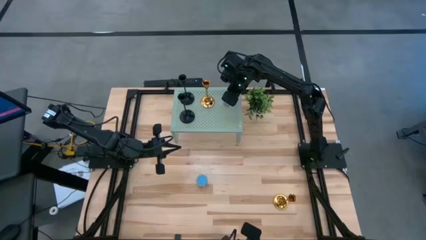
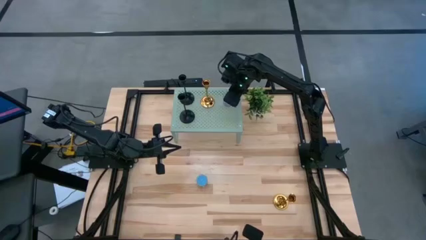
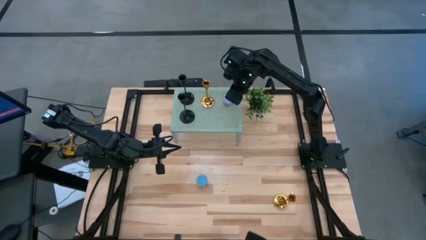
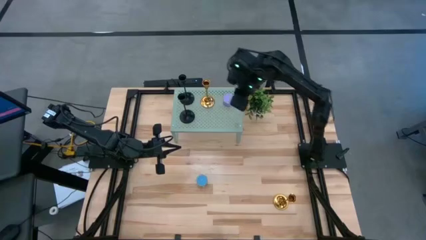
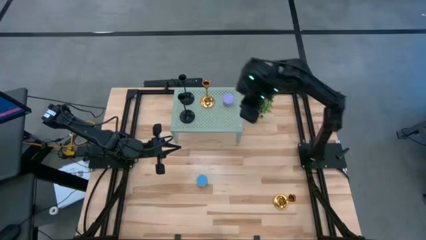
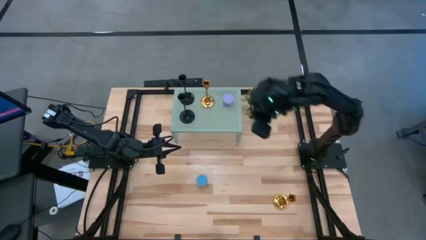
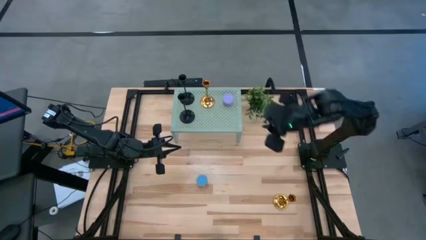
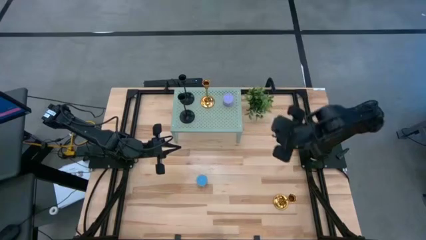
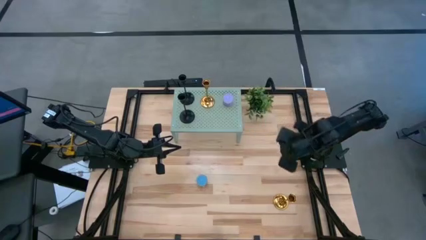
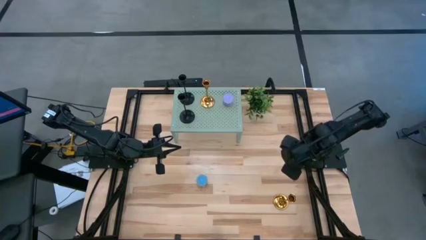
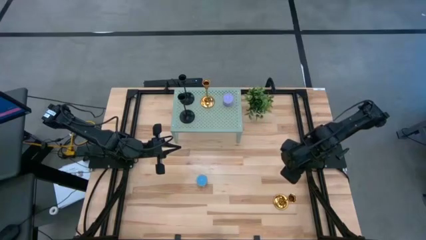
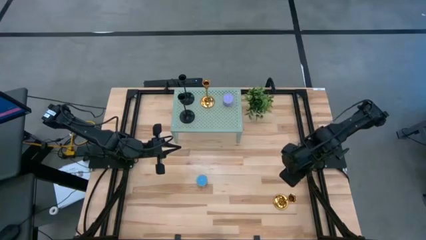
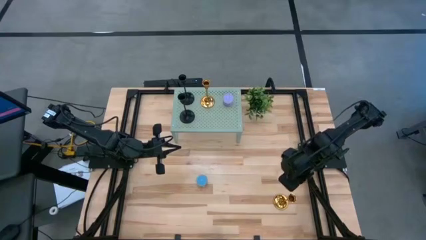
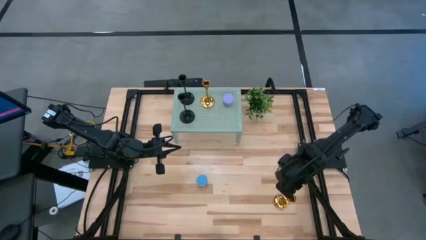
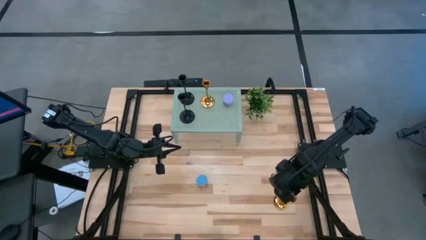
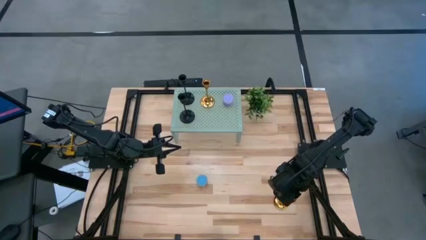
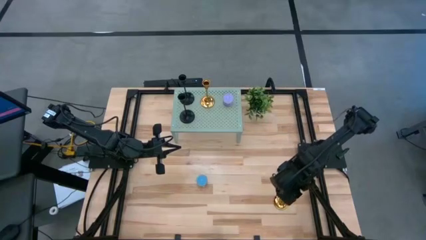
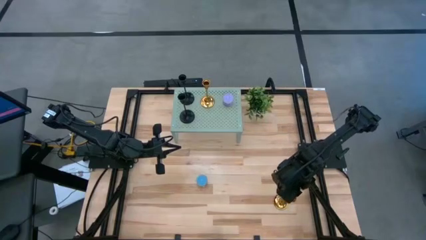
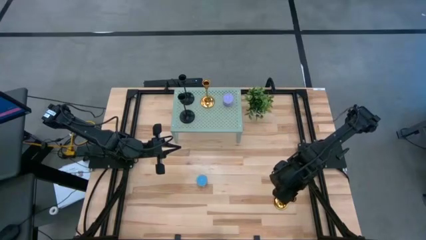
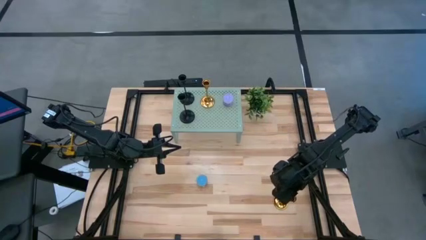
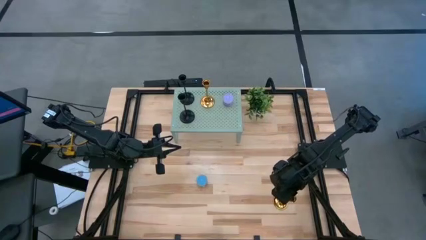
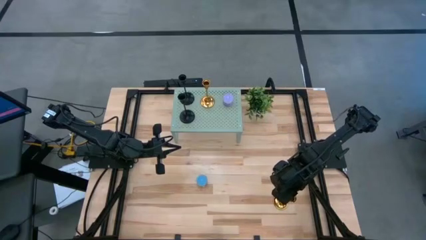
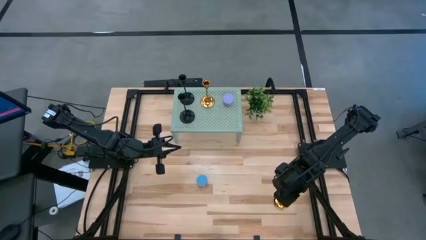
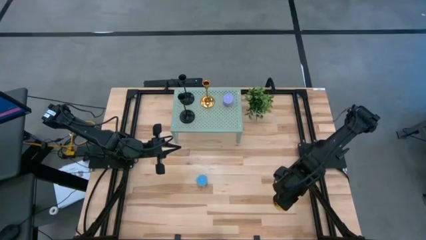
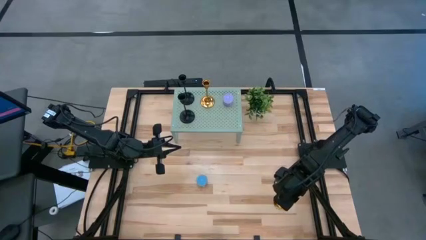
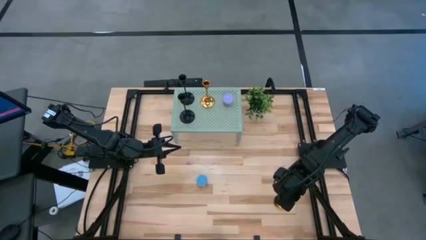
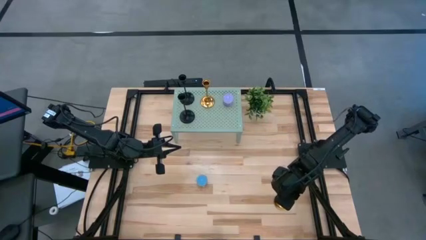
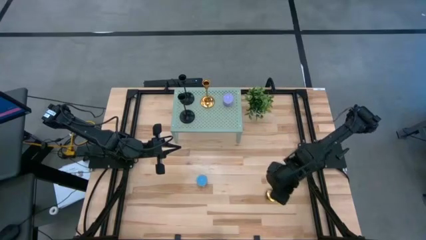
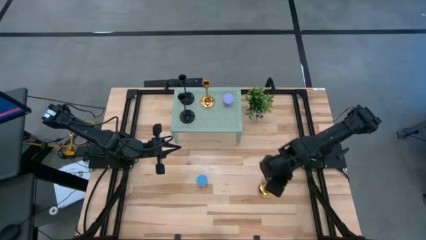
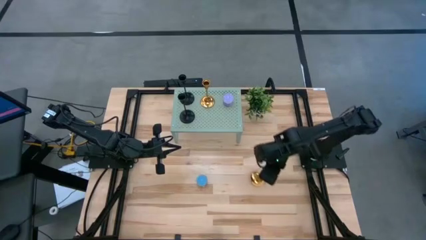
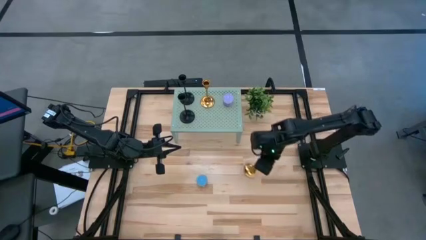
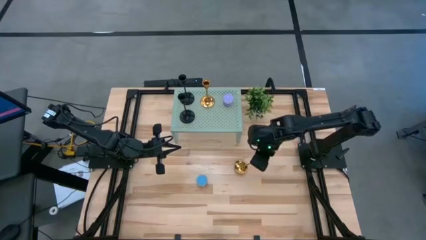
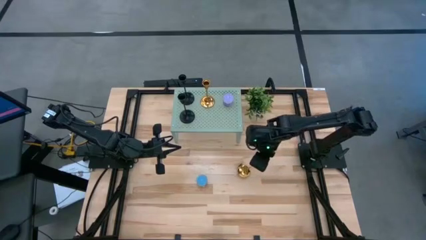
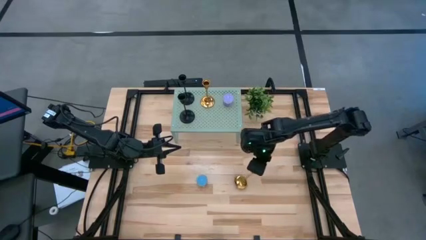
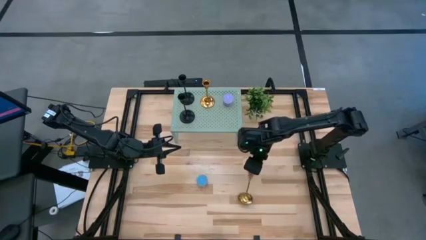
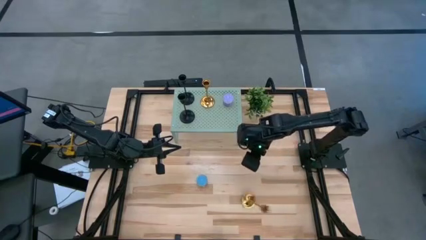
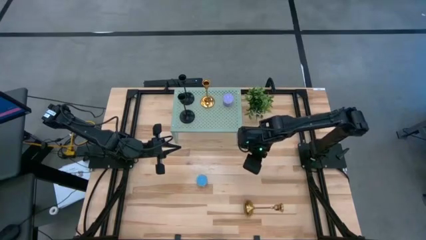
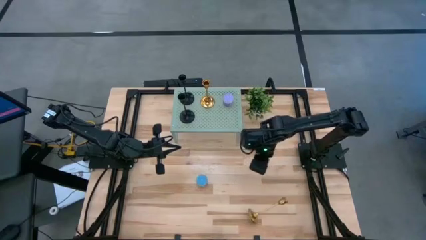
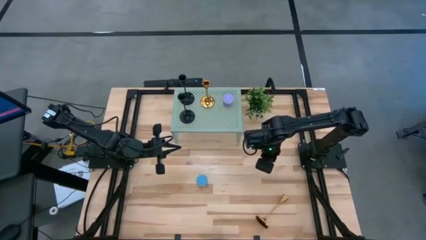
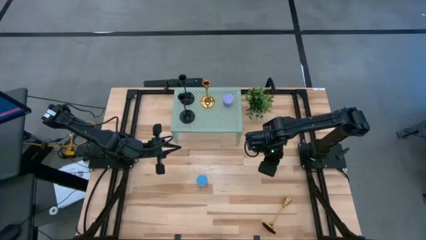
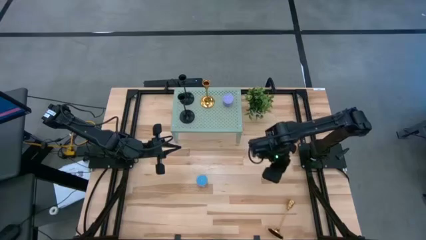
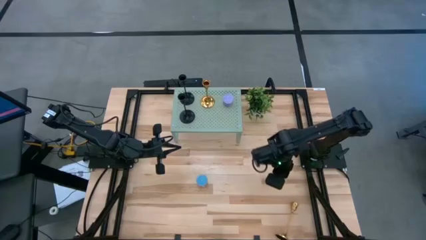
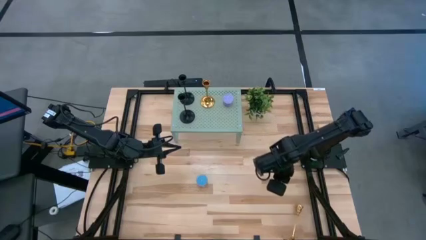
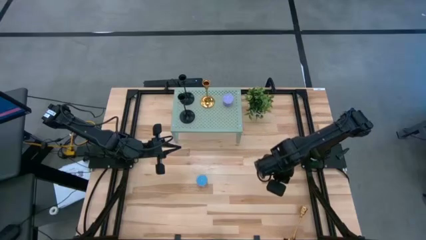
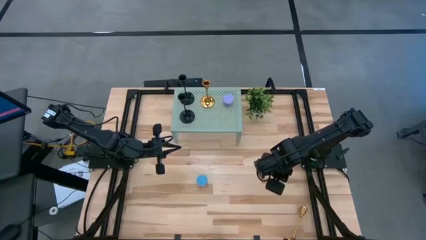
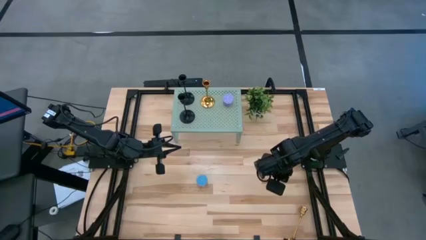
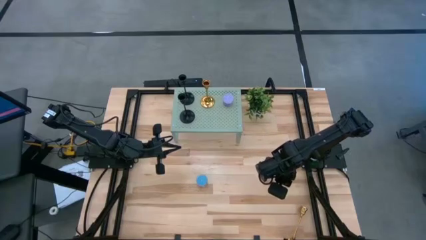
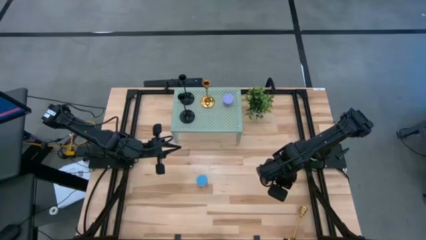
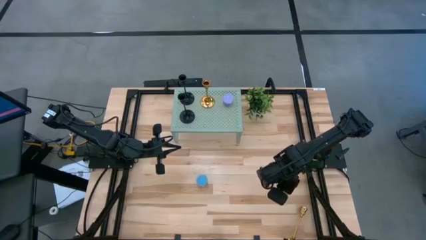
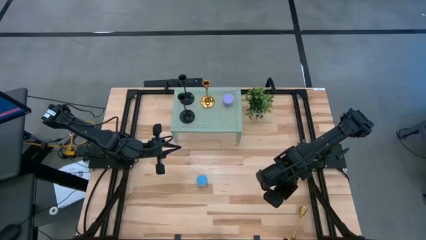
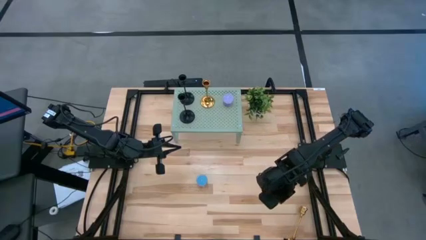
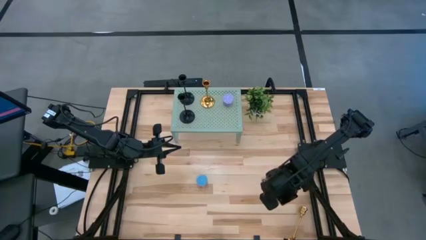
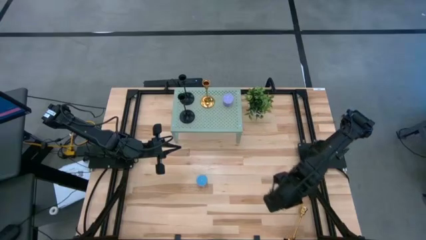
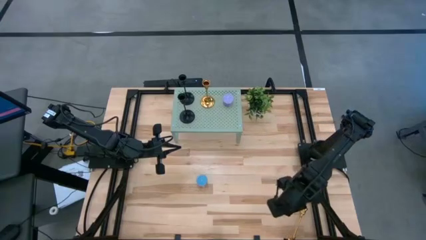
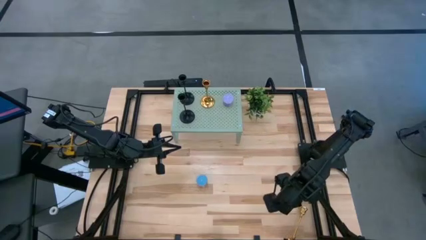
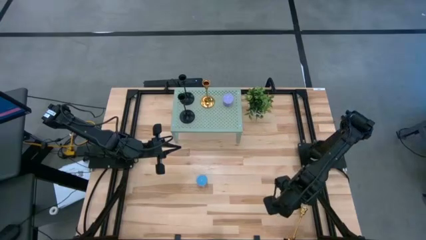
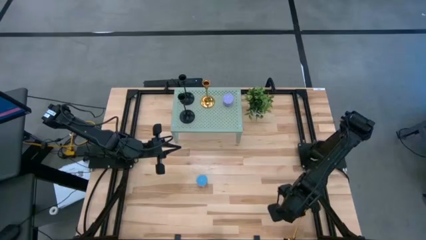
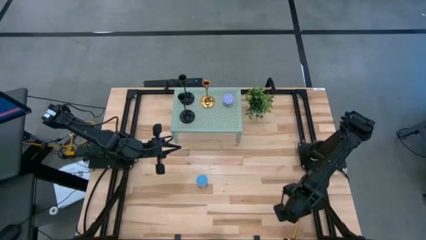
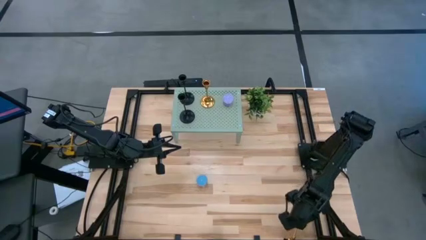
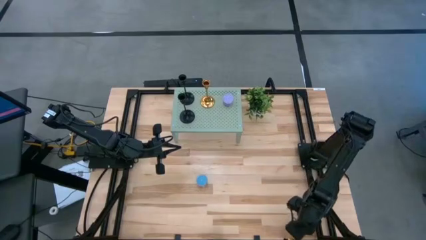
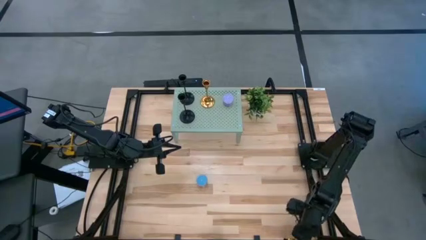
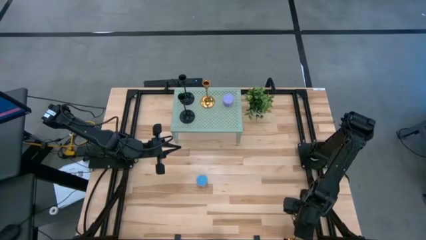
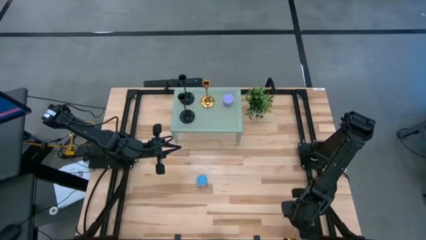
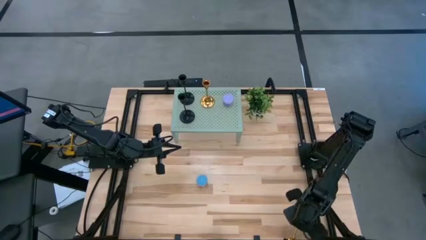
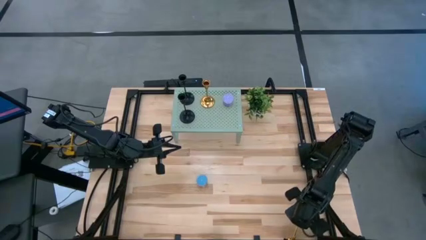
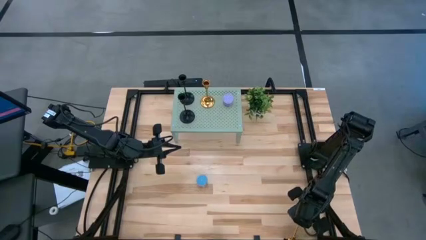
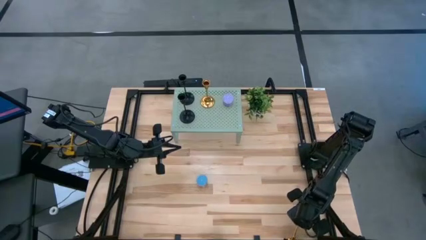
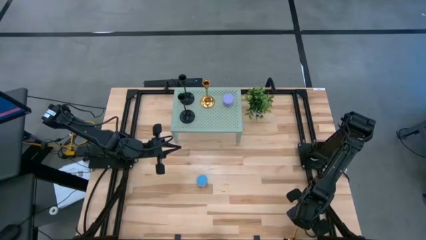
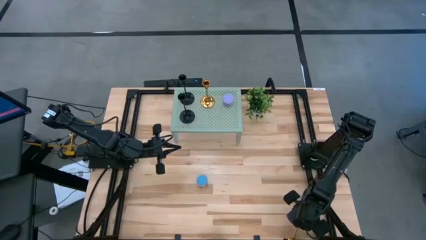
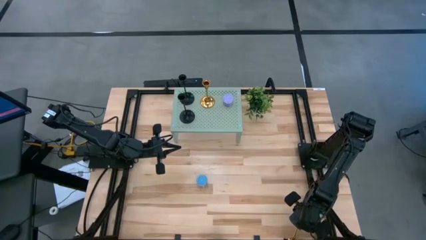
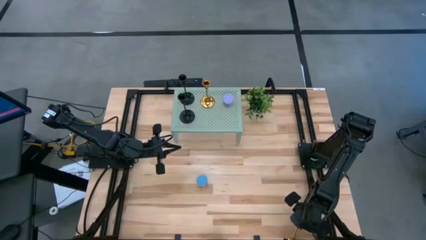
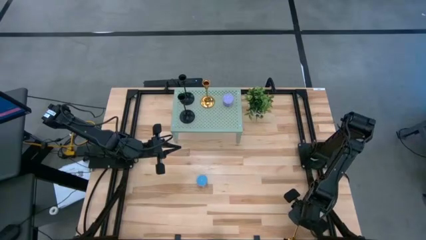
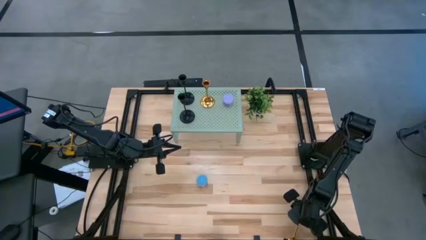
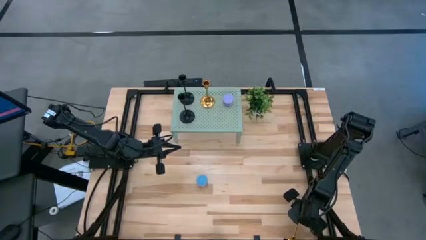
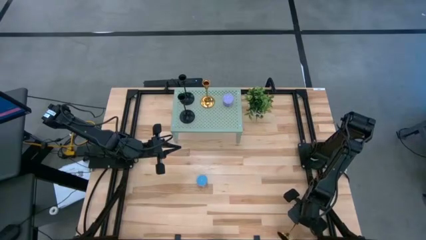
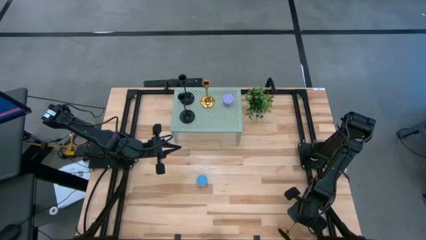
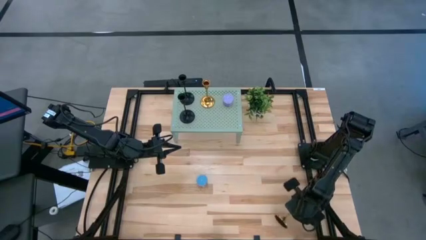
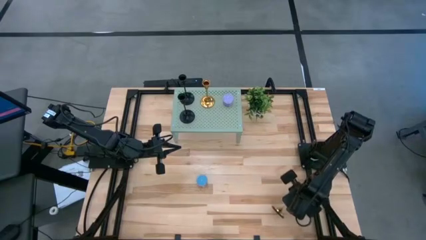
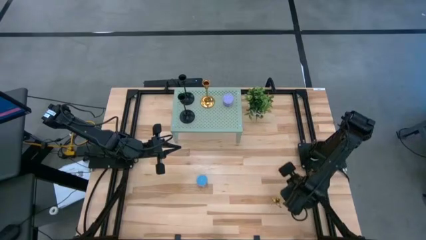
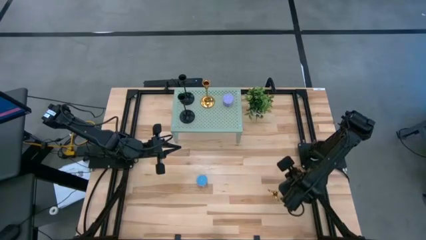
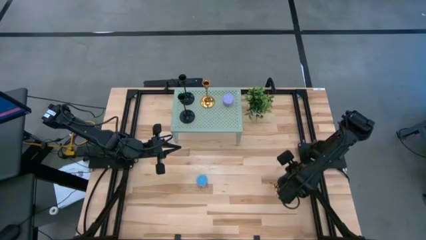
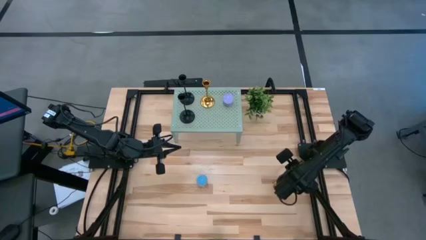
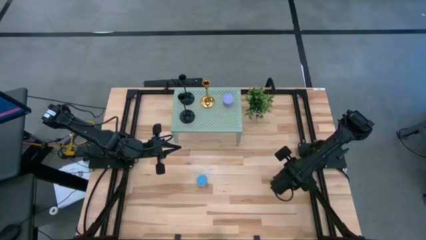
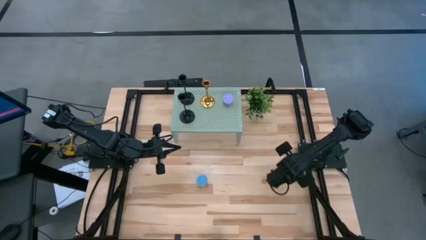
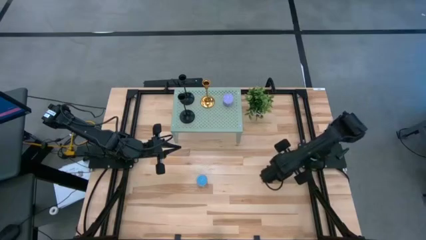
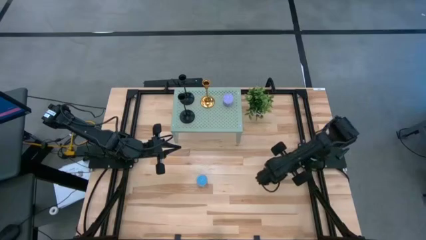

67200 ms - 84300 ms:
Task: Pick & Place candle stick holders
Put the gold candle holder on the shelf
